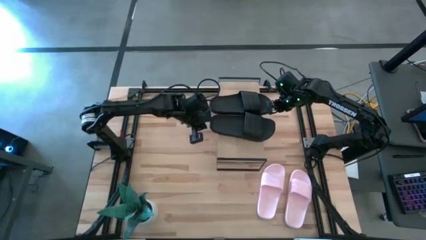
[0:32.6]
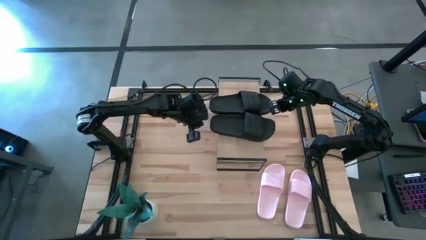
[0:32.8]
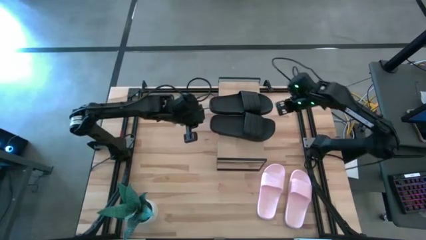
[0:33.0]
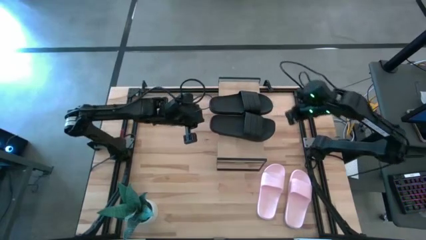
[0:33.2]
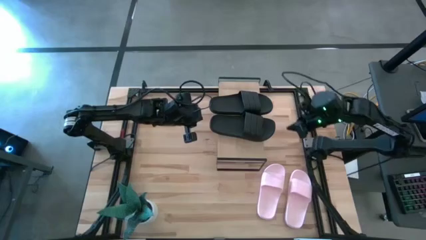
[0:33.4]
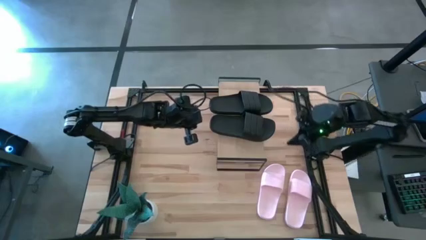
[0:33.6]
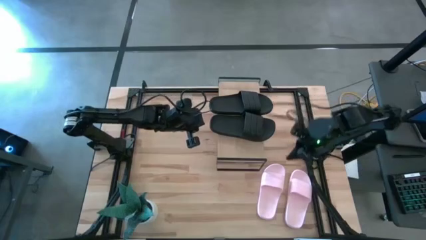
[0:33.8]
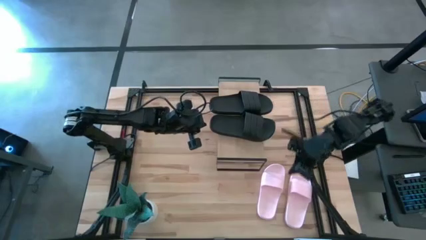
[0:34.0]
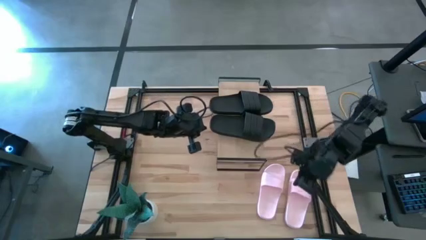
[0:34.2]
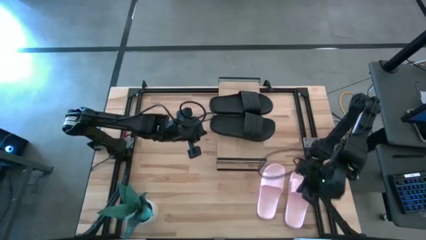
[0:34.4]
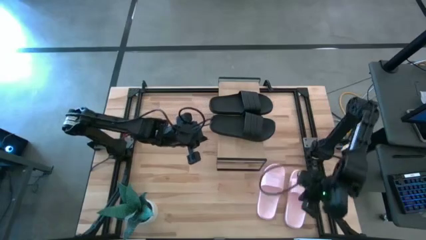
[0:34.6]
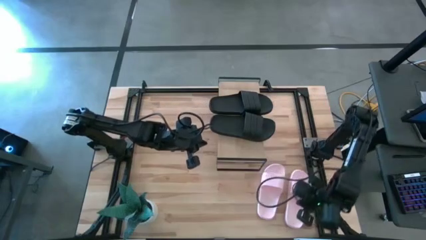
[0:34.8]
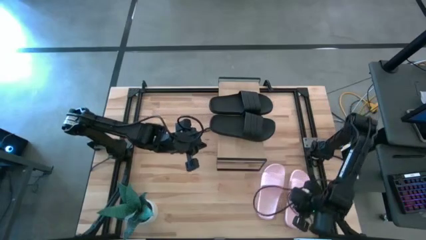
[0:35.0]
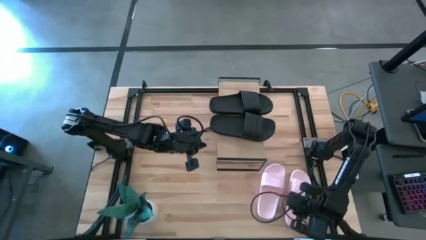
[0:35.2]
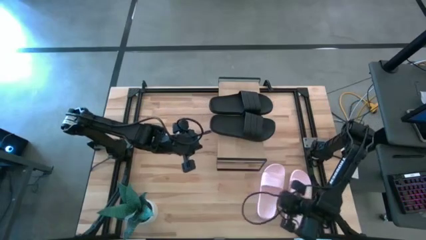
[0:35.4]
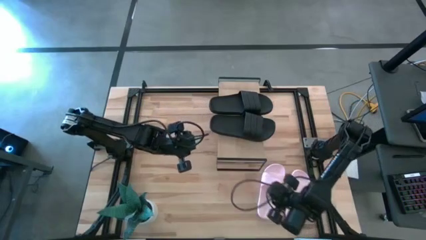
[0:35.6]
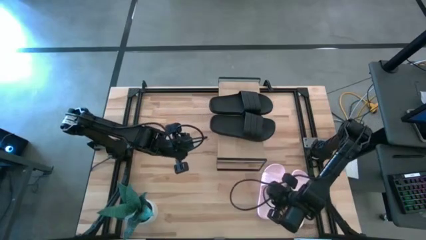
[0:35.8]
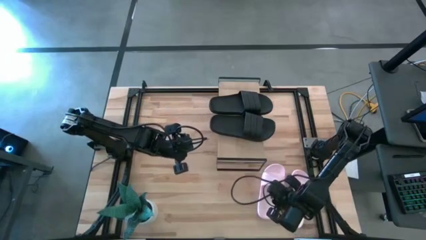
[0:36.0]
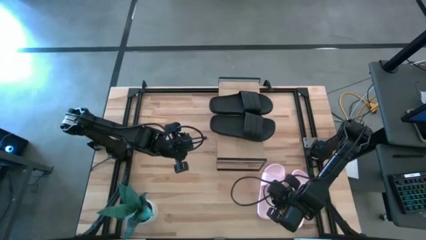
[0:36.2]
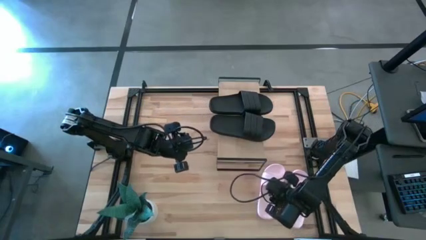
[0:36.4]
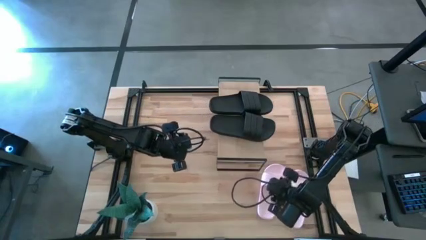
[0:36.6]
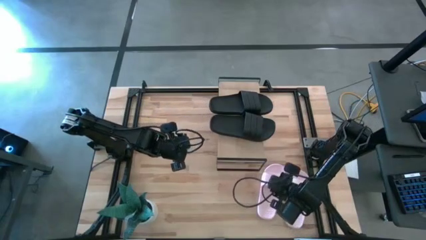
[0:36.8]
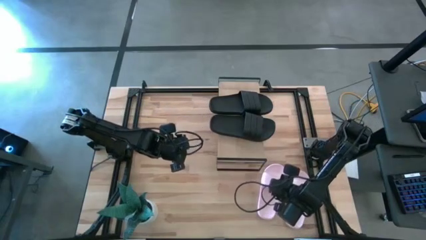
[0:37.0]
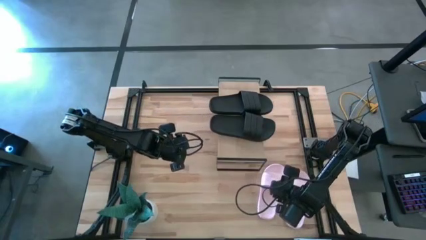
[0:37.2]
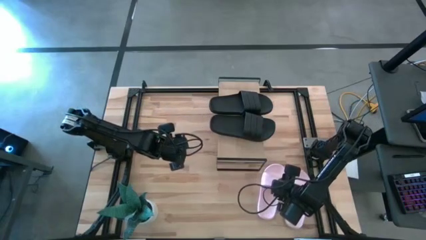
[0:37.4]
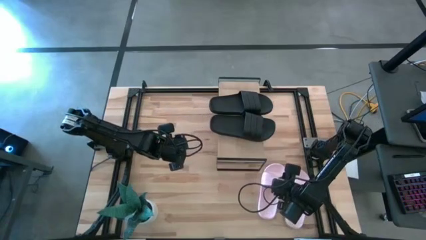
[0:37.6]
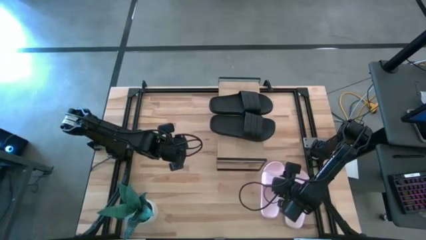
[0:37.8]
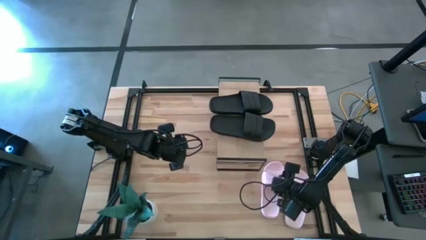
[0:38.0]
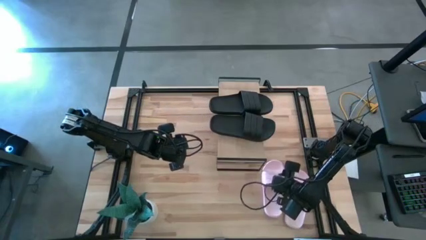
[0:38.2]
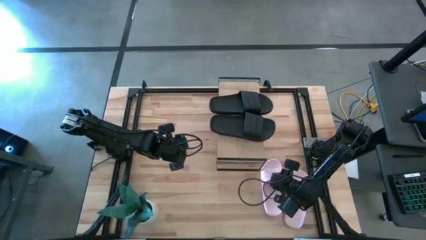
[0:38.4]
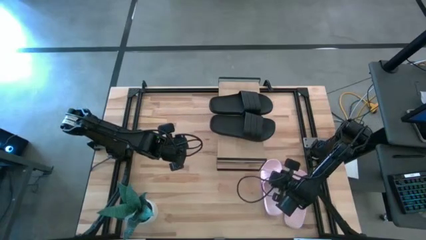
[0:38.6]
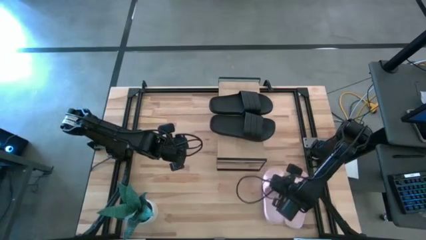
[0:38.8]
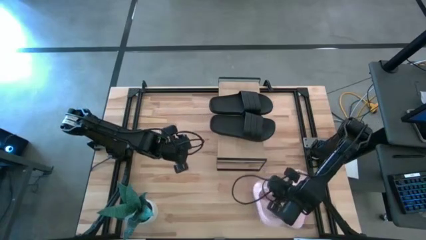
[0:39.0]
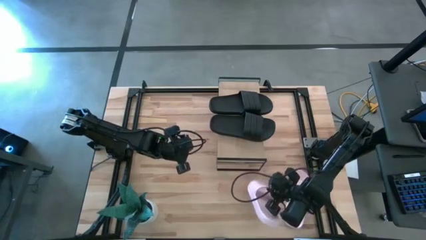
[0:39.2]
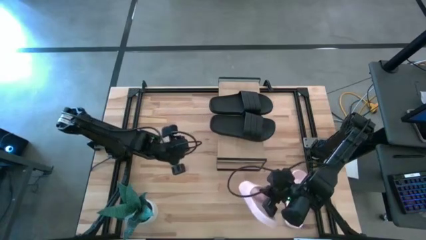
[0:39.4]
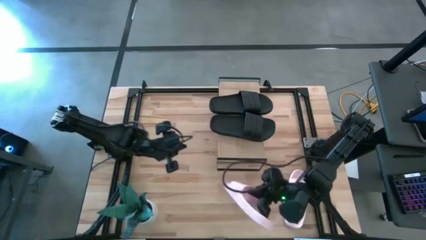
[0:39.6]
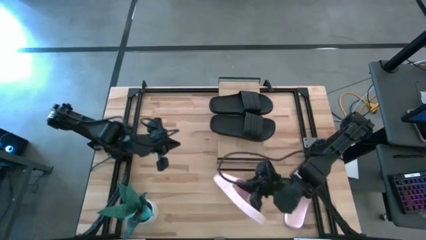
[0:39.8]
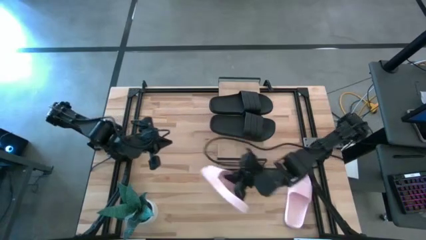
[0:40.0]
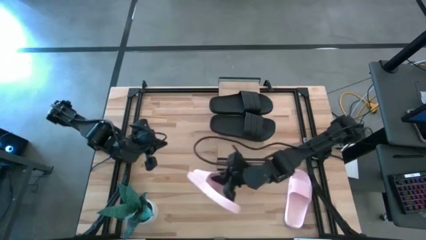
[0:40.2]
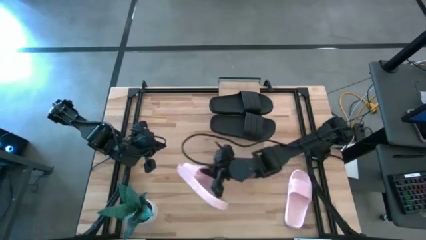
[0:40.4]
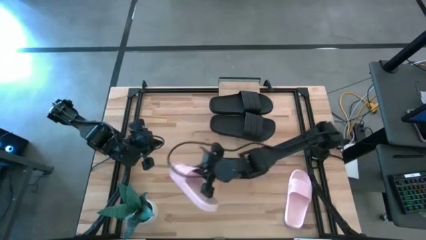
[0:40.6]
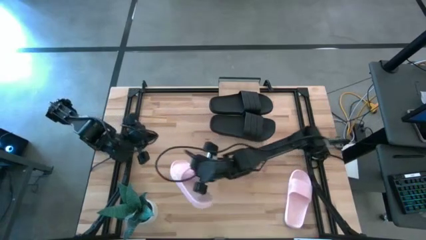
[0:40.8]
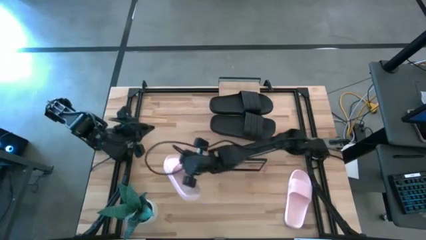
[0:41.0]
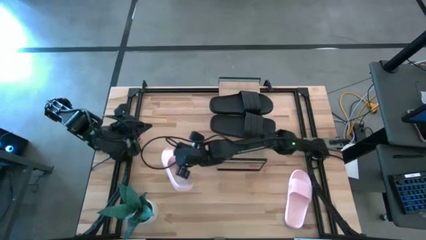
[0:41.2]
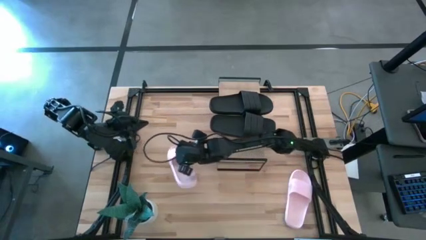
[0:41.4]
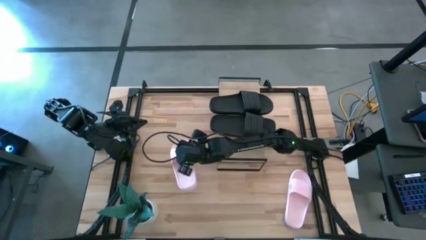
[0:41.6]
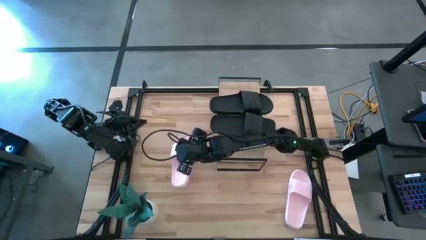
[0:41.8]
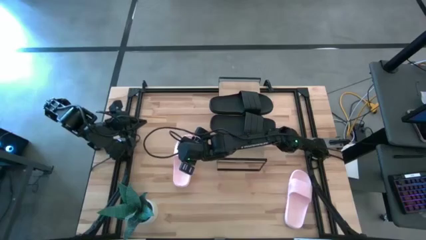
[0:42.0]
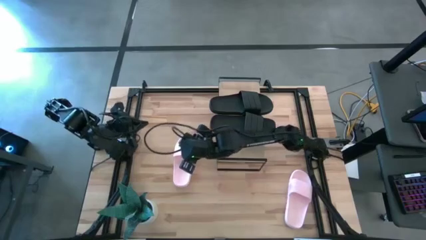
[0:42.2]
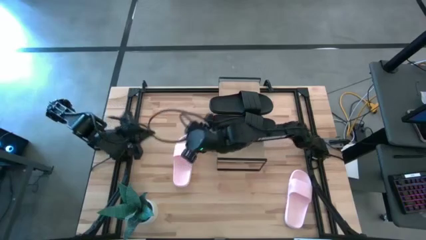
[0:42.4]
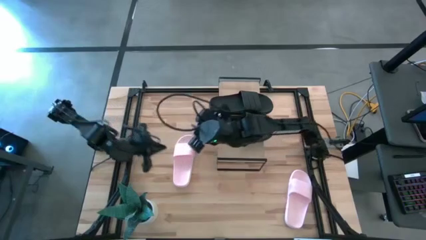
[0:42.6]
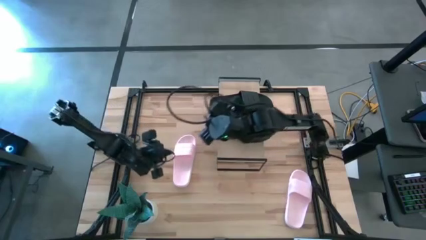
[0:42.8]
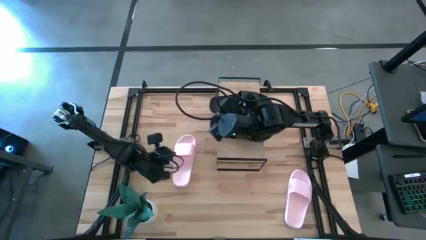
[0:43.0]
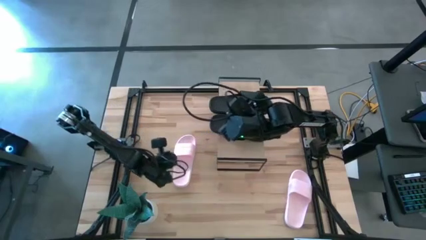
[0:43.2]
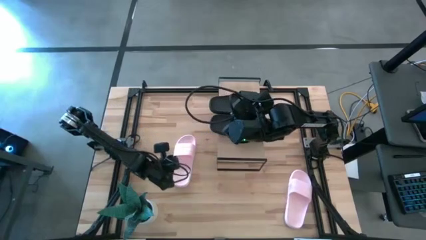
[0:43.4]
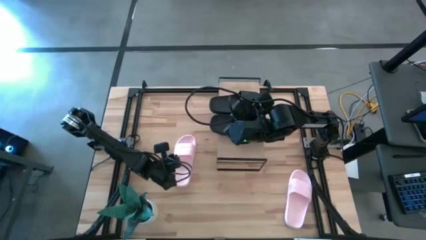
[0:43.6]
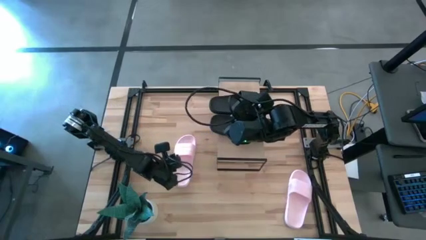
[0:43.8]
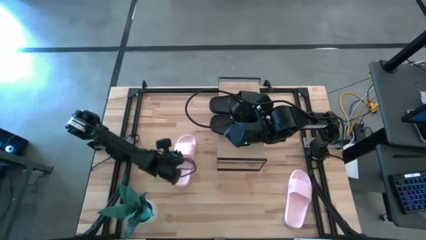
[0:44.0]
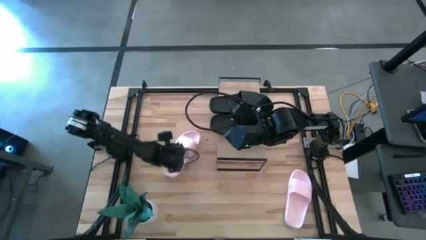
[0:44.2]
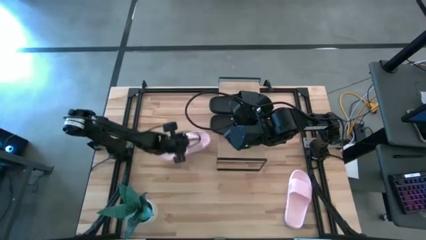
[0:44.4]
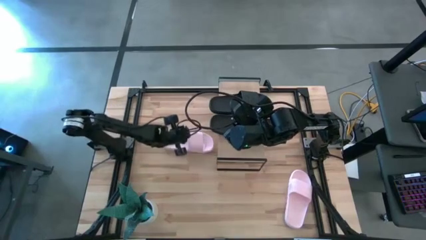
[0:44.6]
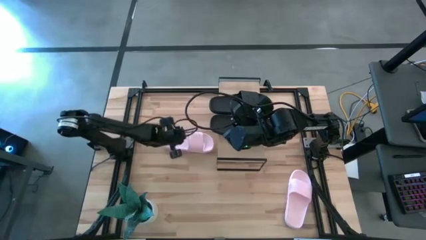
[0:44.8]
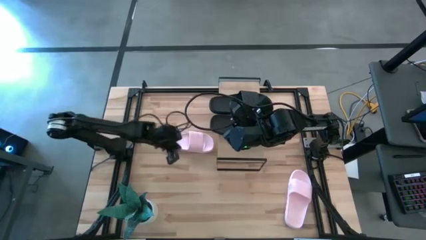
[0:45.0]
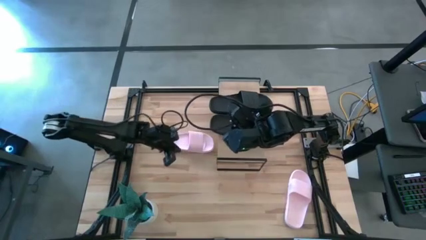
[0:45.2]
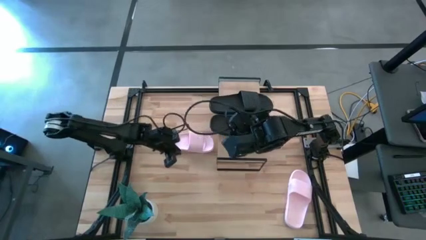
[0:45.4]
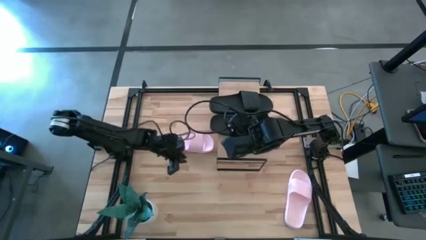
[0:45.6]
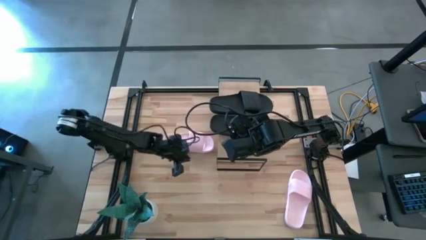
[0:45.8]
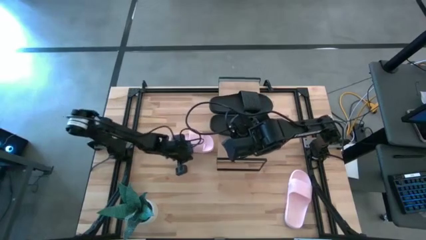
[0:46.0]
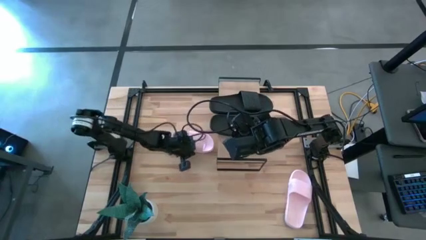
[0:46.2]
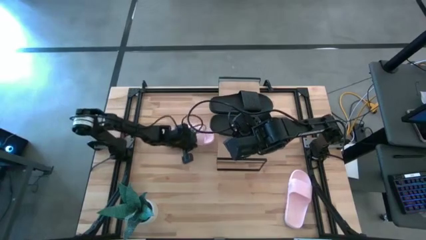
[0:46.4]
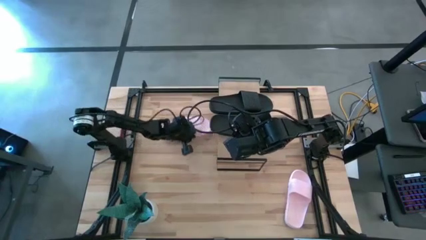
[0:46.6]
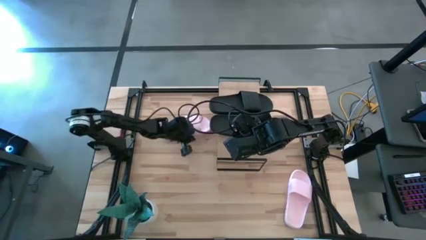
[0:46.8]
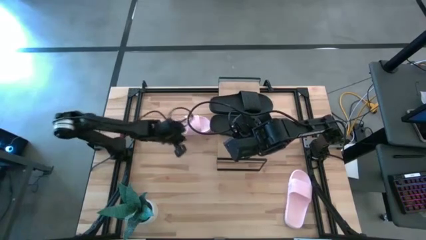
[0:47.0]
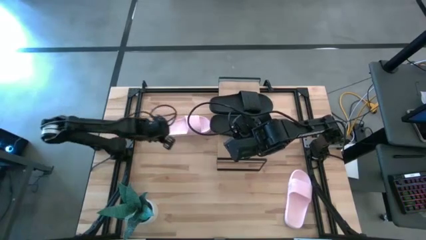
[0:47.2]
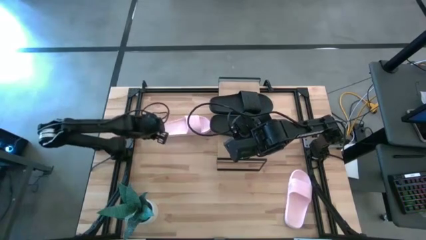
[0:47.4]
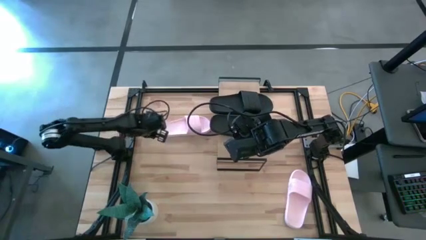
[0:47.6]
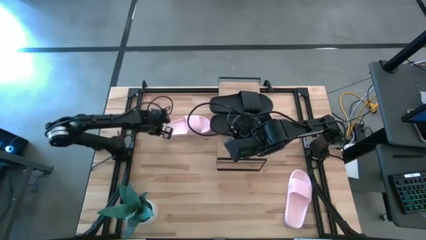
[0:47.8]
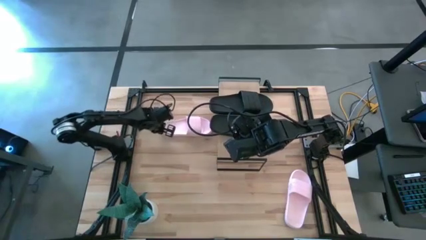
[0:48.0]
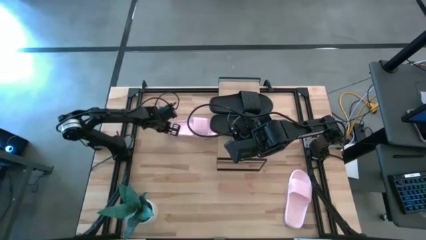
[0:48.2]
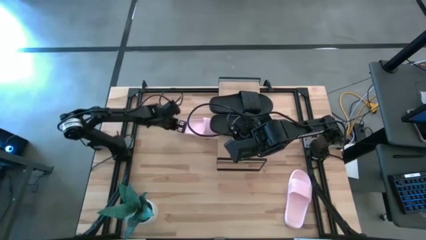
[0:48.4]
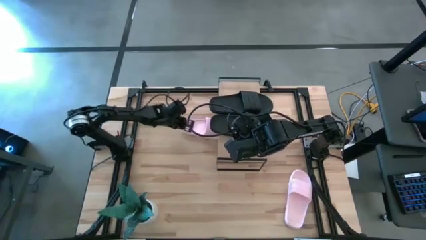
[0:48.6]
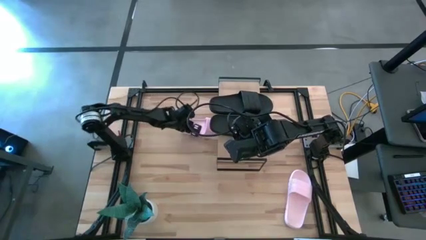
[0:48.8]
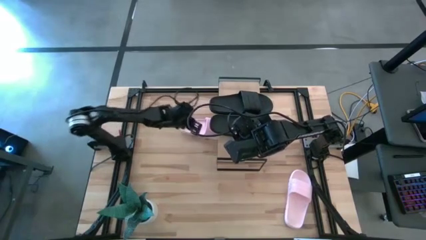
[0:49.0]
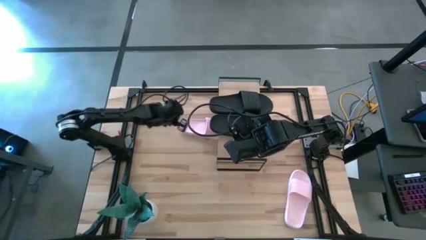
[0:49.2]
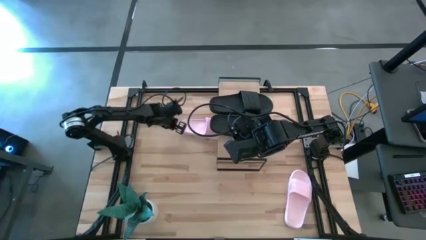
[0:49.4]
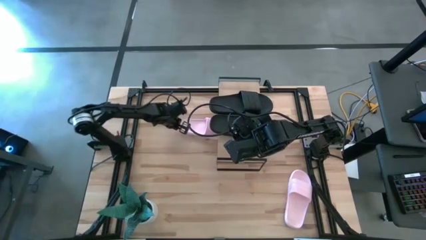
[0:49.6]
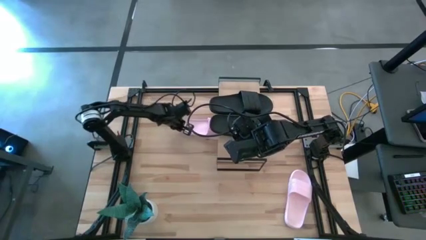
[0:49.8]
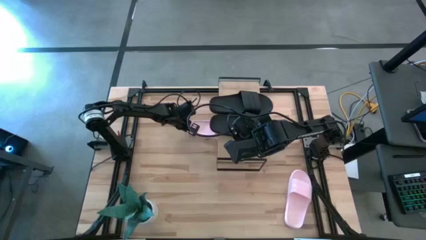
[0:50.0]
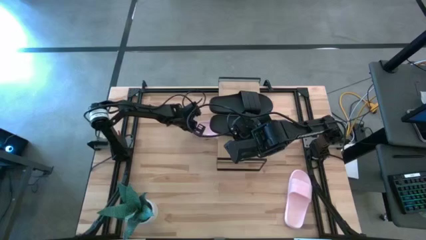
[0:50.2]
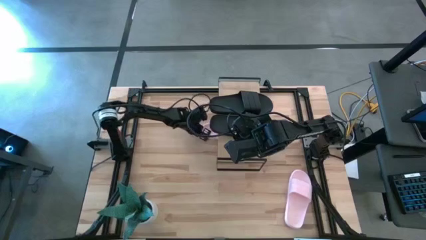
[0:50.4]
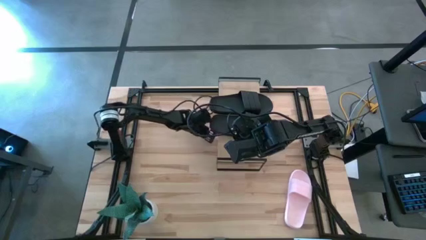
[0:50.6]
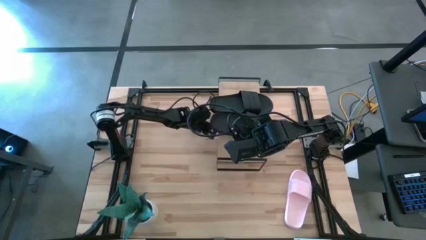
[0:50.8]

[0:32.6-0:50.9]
Task: Pick and place slides into the shelf
Put the left pink slide under the shelf
